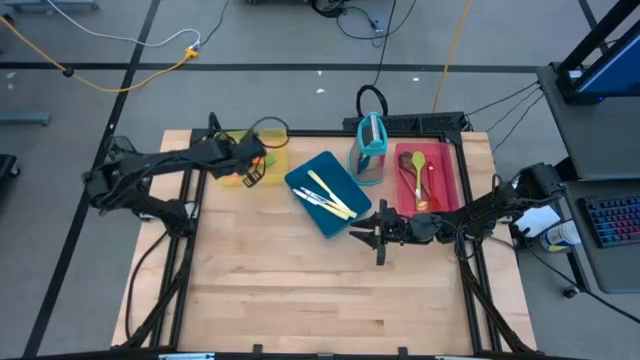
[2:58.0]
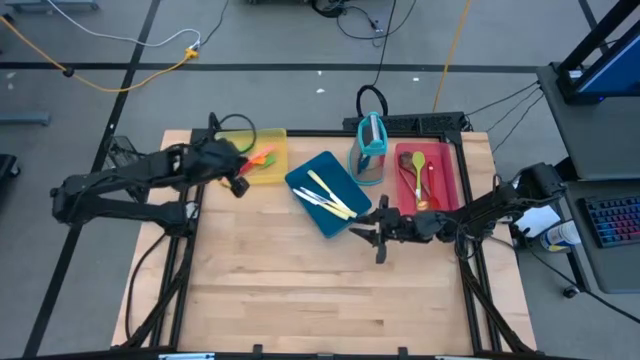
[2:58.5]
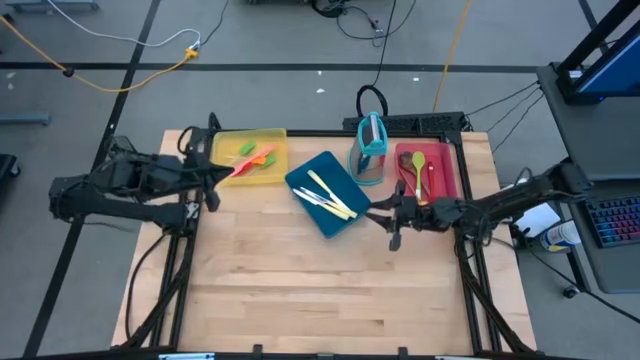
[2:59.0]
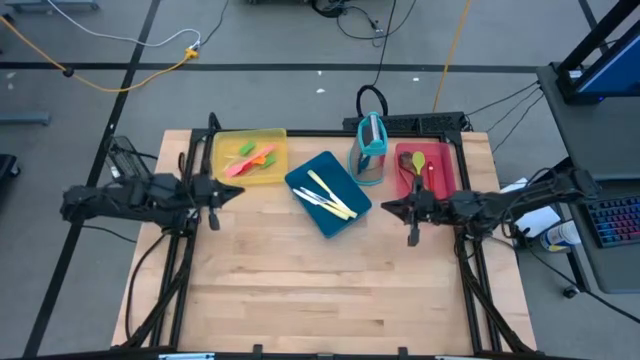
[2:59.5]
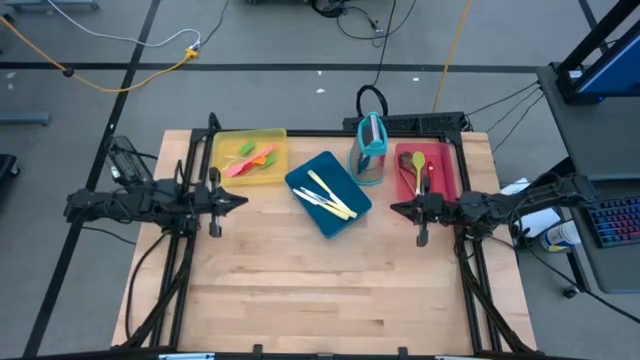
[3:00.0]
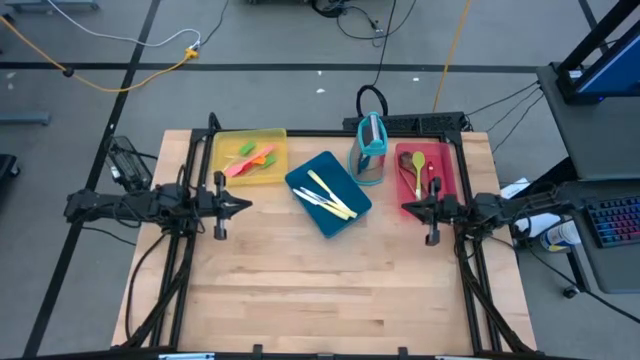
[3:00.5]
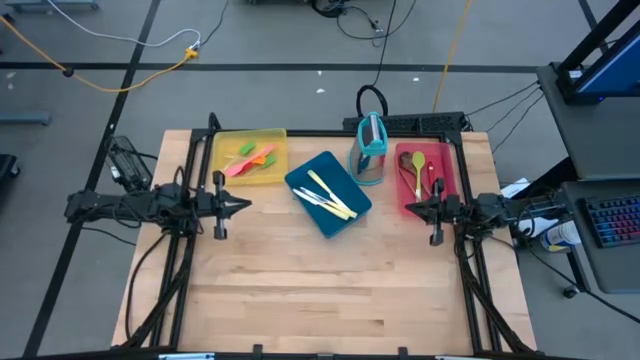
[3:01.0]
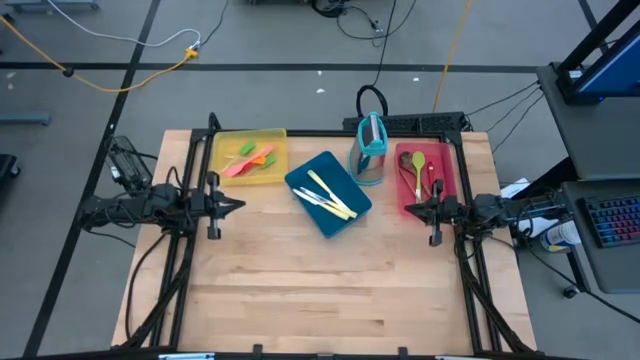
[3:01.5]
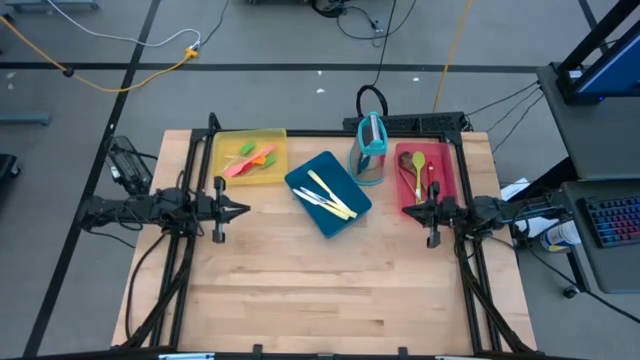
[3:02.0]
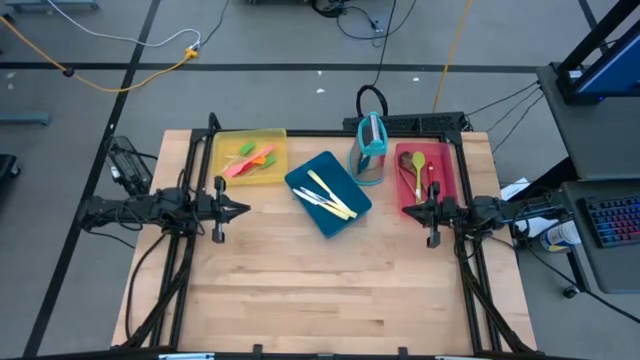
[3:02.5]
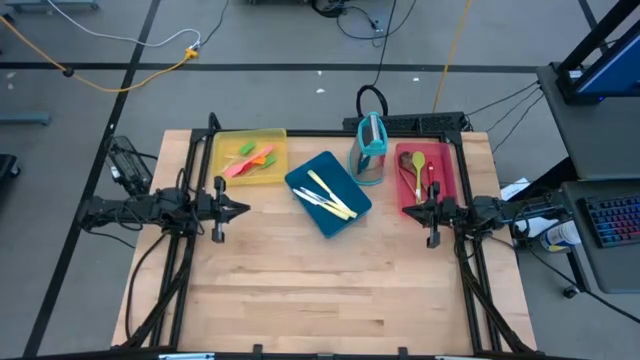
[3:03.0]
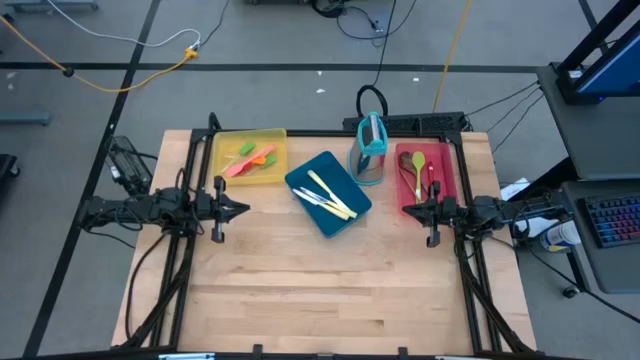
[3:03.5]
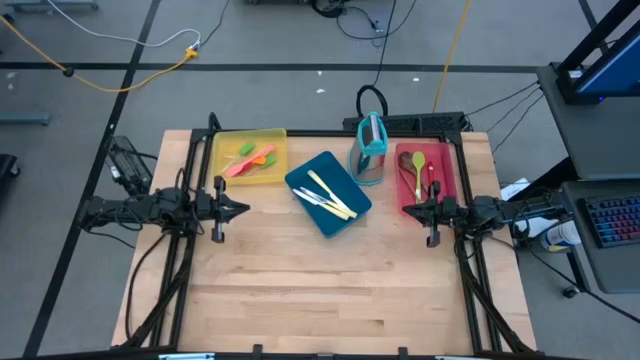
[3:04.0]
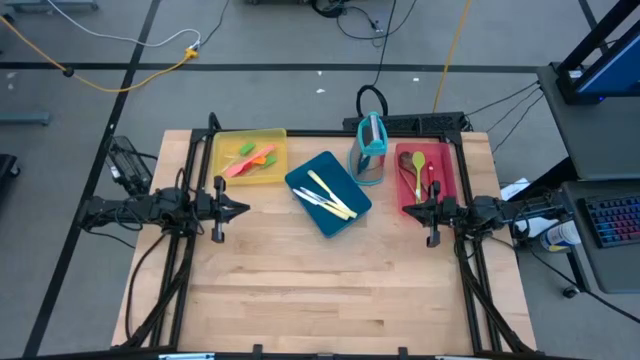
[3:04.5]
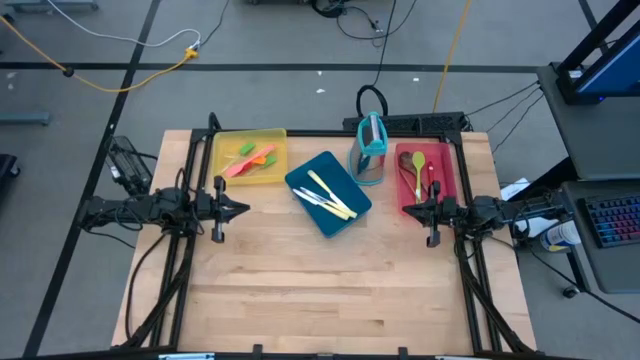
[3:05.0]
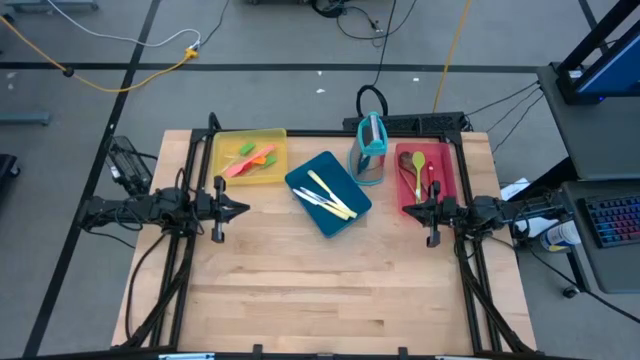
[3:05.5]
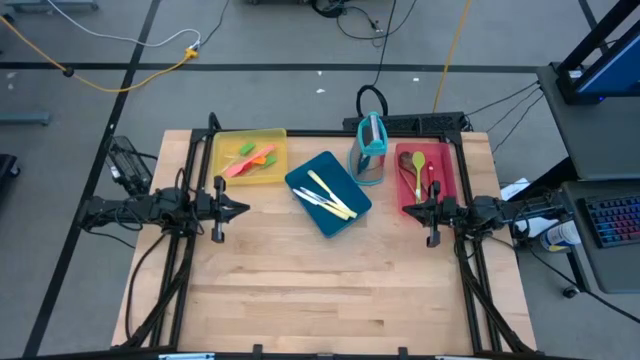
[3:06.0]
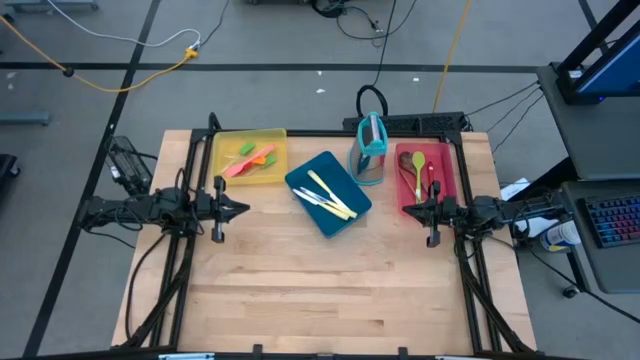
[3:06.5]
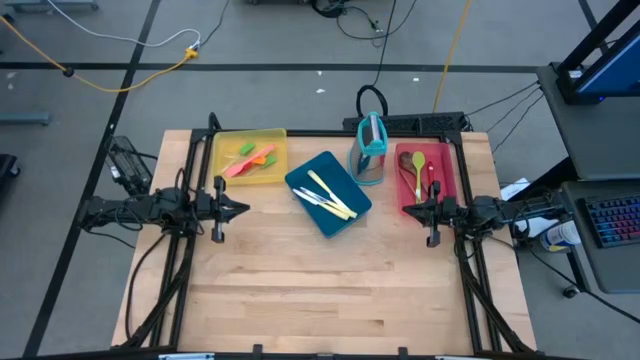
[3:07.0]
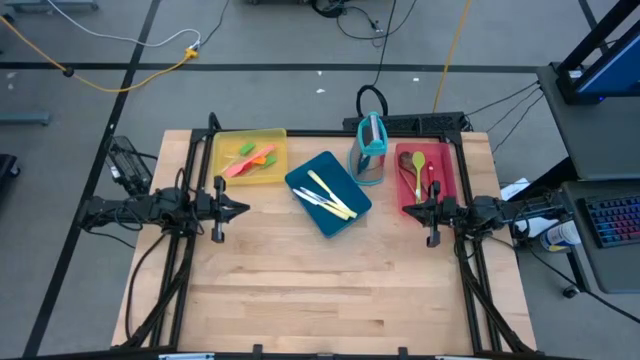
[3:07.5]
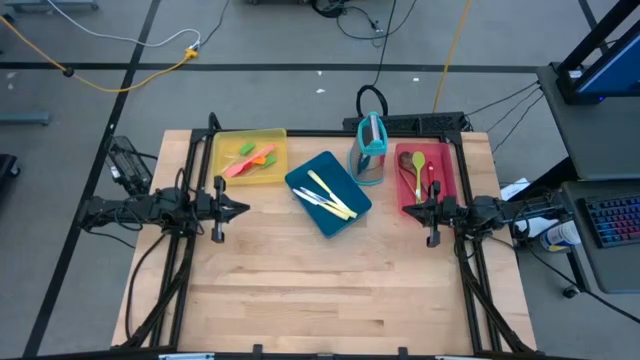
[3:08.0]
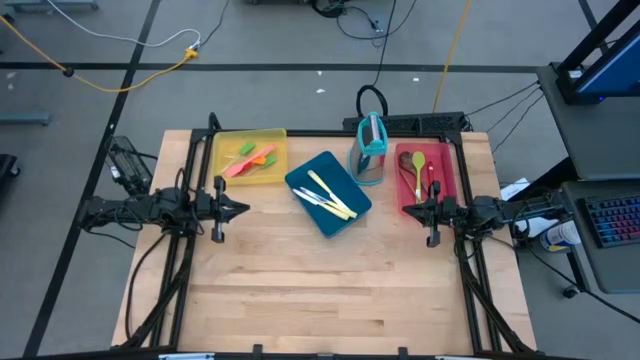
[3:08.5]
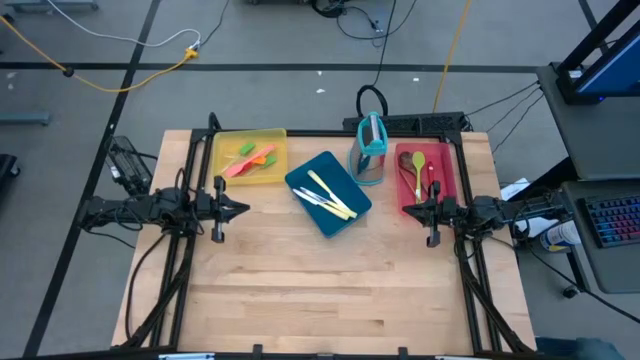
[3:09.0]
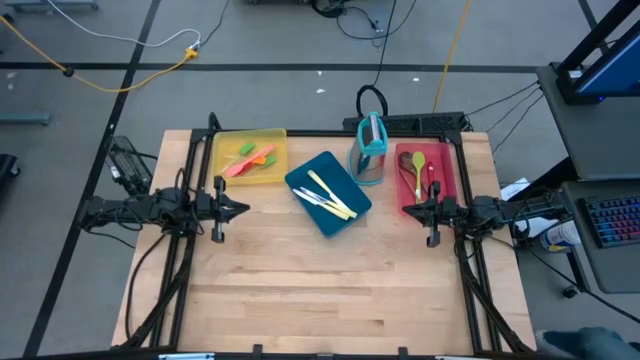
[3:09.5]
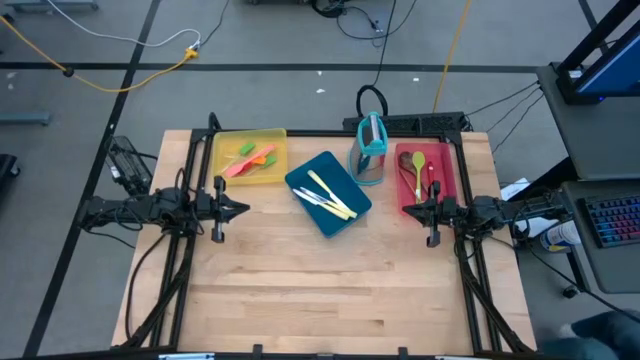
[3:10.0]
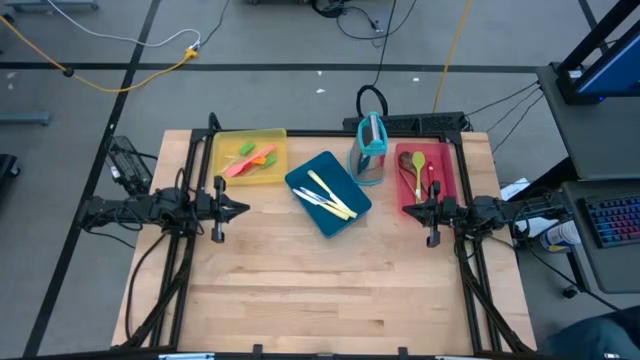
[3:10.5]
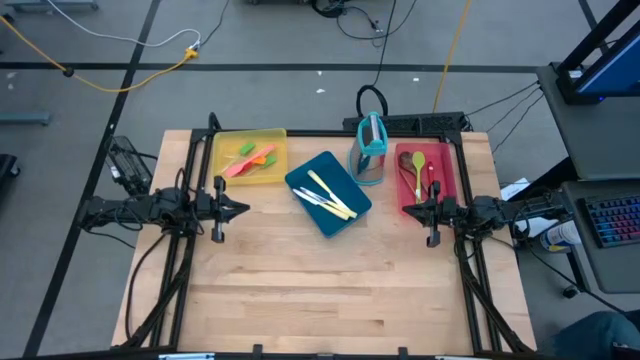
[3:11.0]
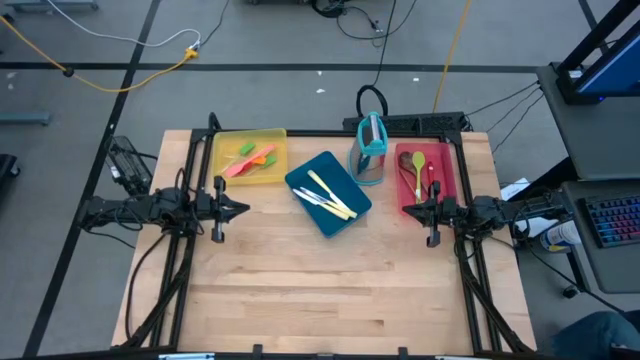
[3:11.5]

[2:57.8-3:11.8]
Task: Pick & Place Kitchen Items
Return to Home Position

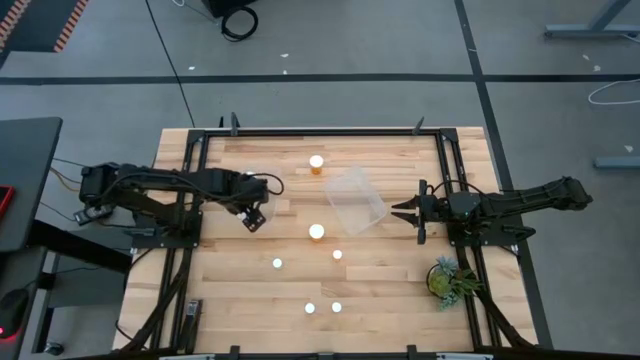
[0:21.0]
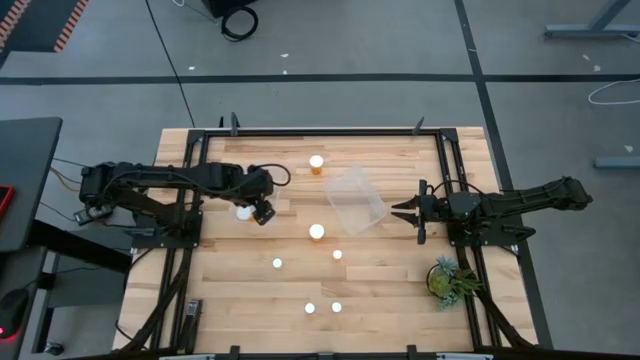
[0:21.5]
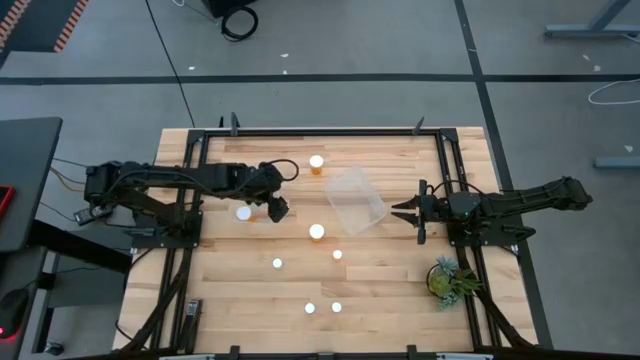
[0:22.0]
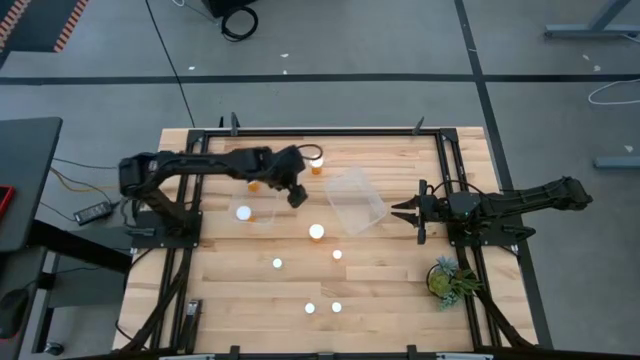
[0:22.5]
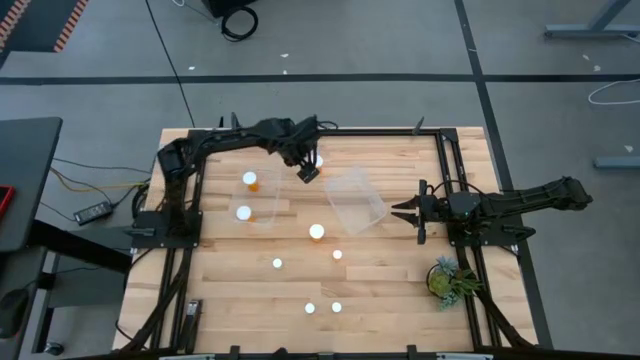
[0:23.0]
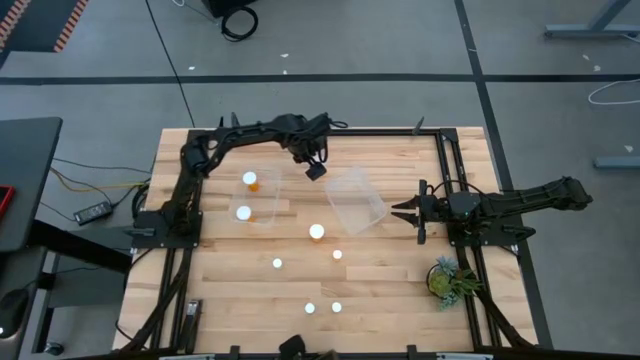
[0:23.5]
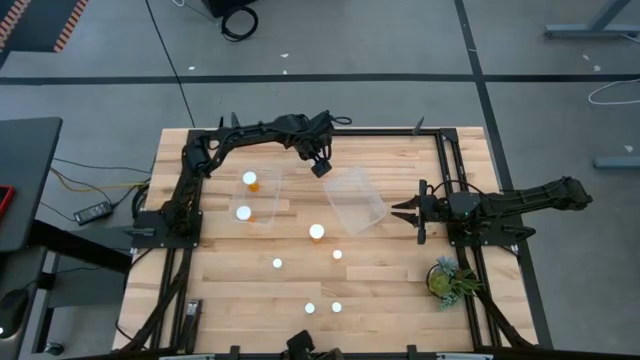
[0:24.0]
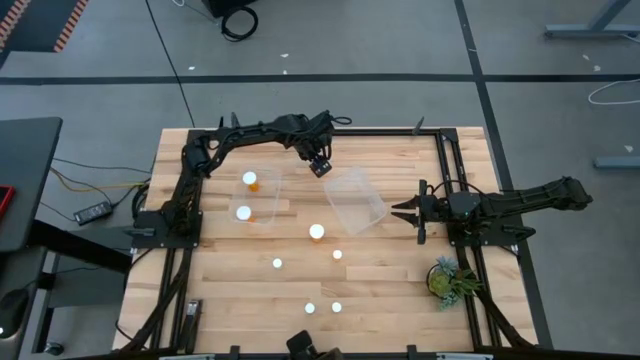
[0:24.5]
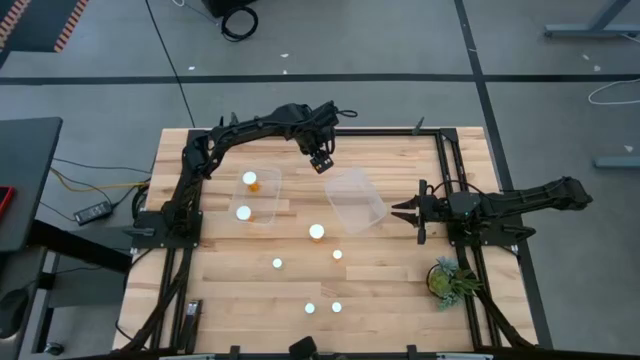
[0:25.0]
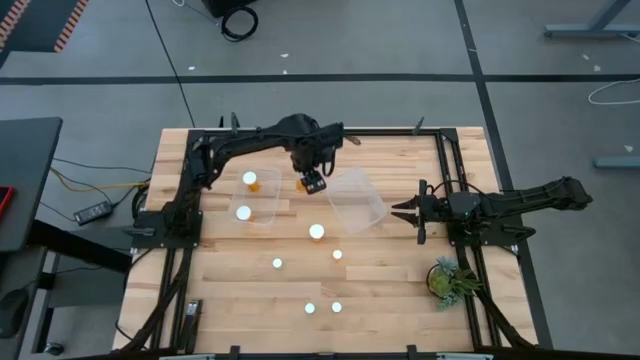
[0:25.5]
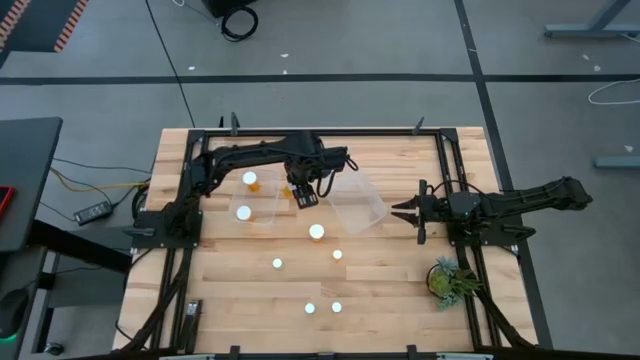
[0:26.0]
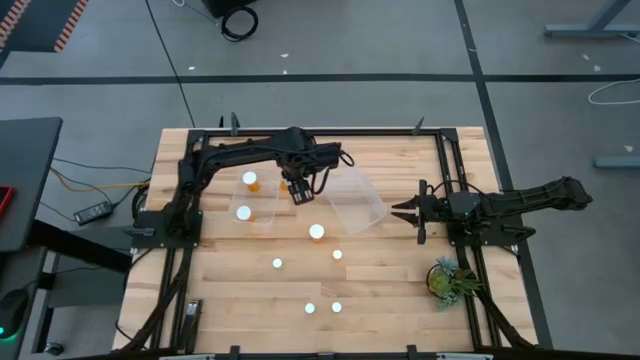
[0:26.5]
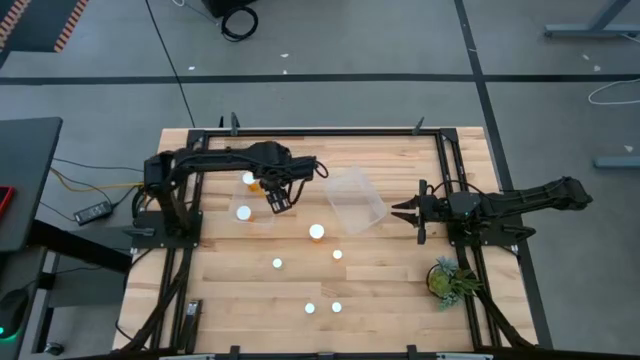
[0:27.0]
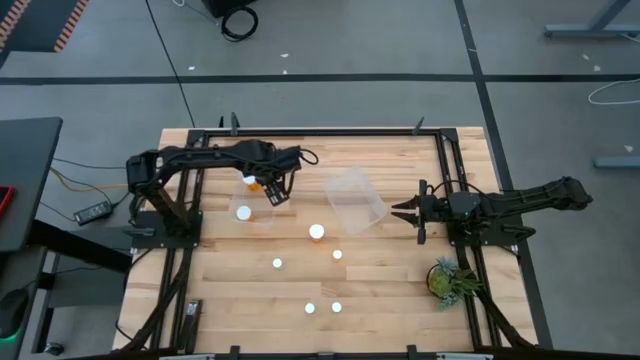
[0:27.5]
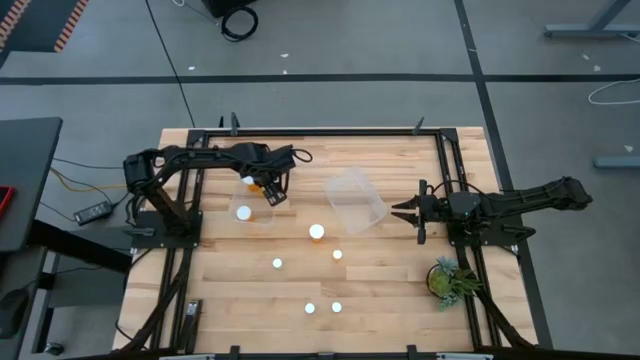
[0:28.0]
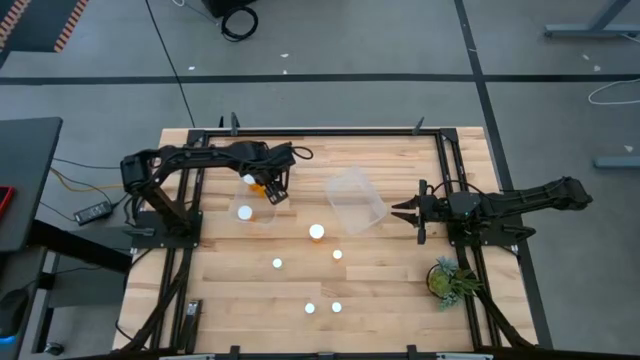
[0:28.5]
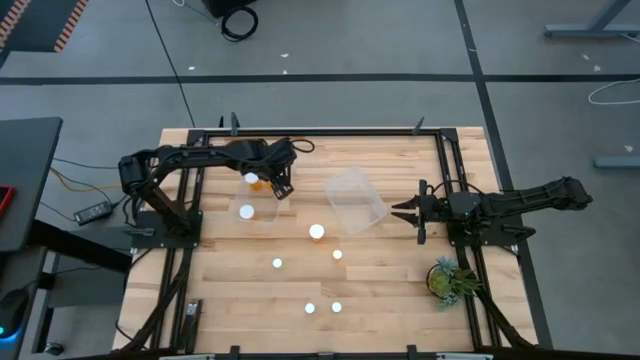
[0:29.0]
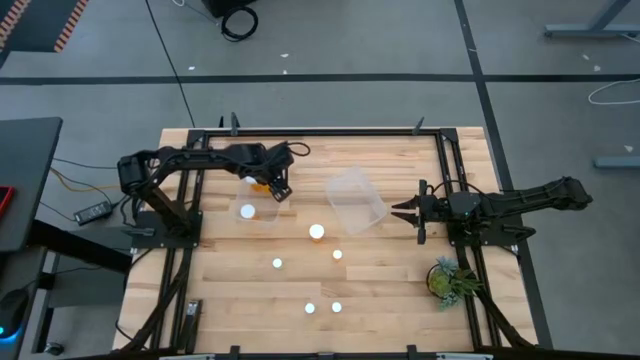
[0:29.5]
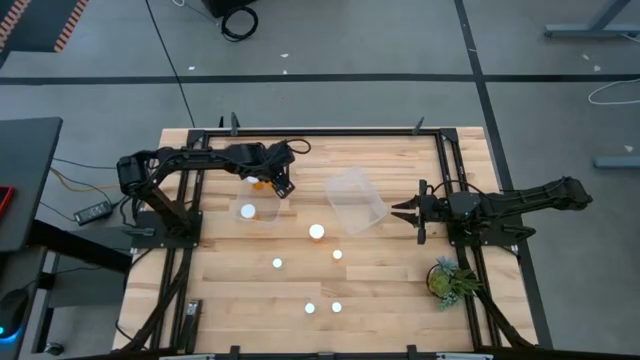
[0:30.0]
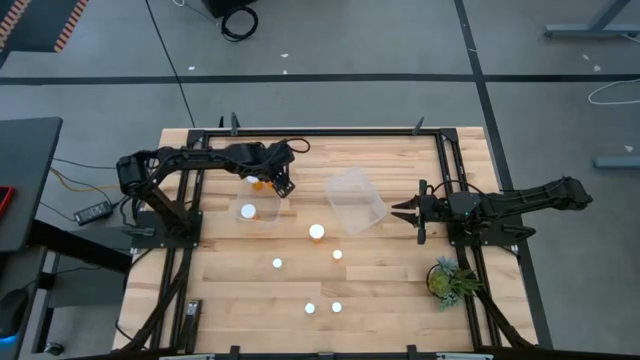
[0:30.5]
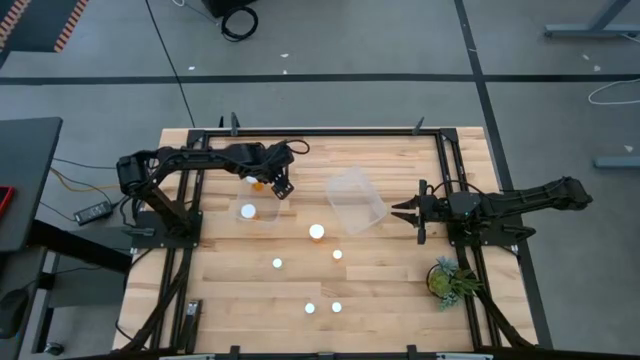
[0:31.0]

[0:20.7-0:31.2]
Task: Pick and place medicine bottles into bin by pill shape (circle, oval)
Put the large orange pill bottle into the left transparent bin
